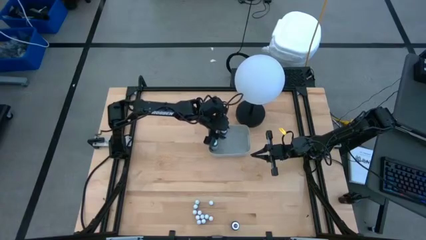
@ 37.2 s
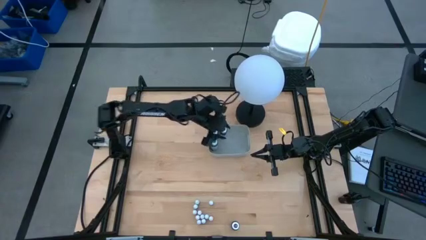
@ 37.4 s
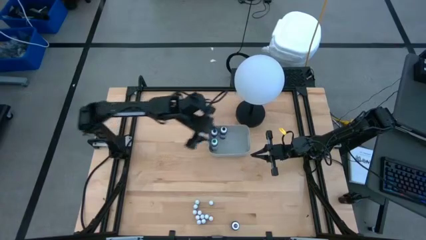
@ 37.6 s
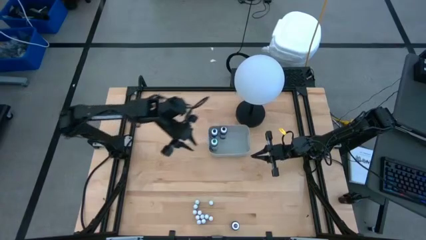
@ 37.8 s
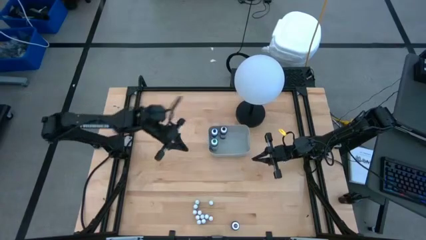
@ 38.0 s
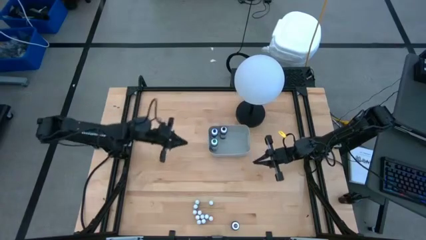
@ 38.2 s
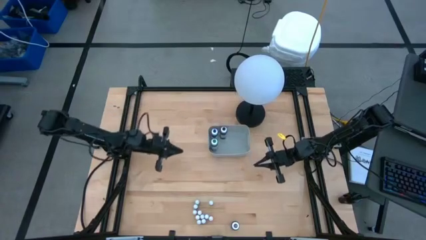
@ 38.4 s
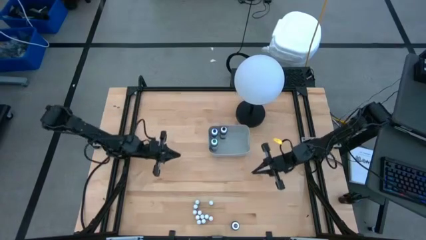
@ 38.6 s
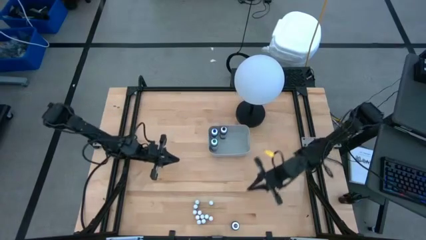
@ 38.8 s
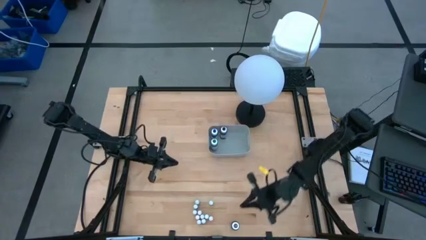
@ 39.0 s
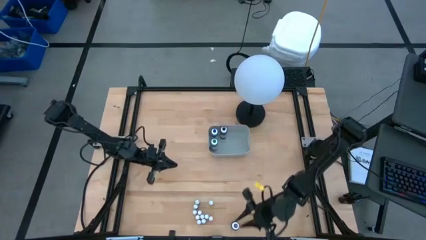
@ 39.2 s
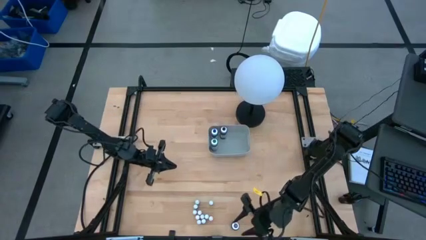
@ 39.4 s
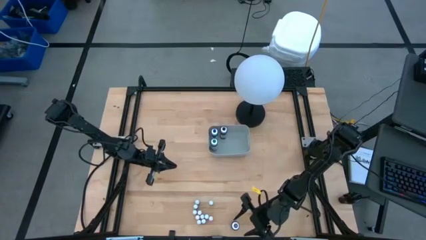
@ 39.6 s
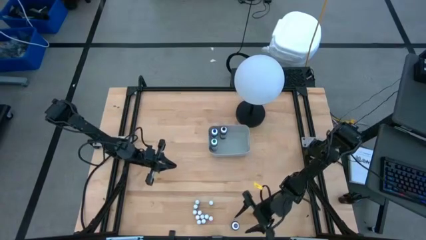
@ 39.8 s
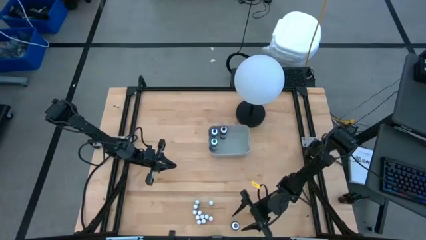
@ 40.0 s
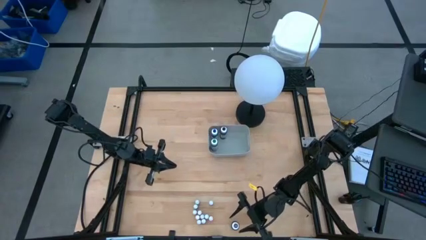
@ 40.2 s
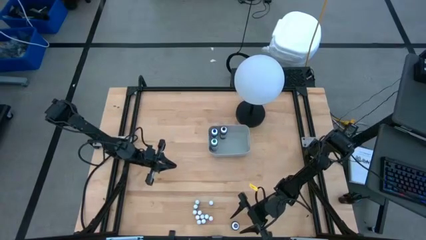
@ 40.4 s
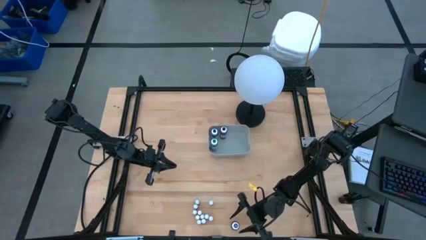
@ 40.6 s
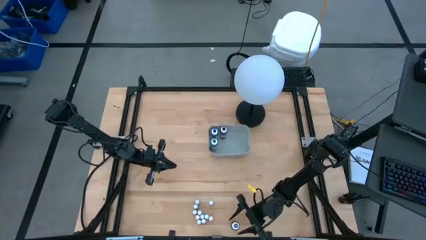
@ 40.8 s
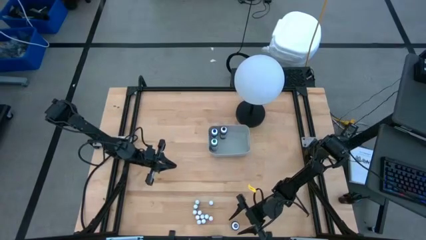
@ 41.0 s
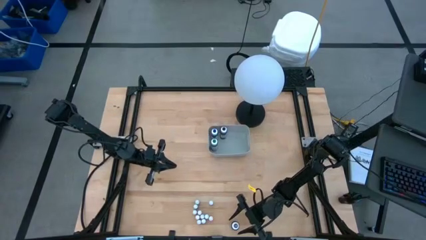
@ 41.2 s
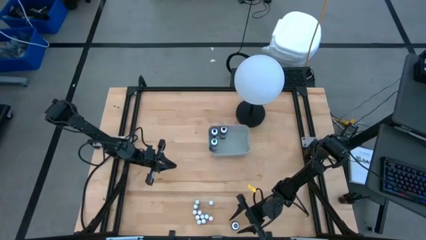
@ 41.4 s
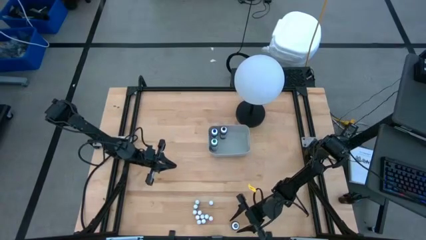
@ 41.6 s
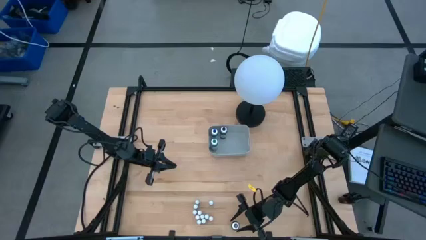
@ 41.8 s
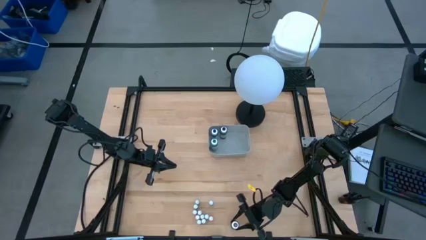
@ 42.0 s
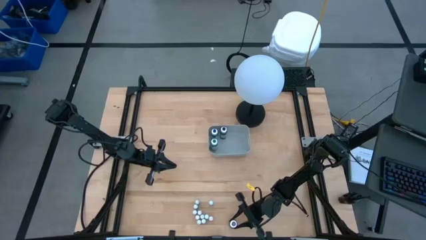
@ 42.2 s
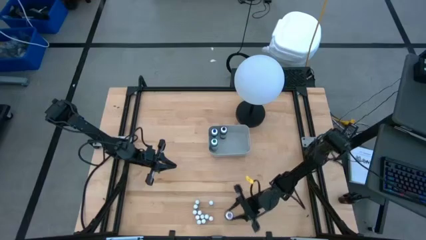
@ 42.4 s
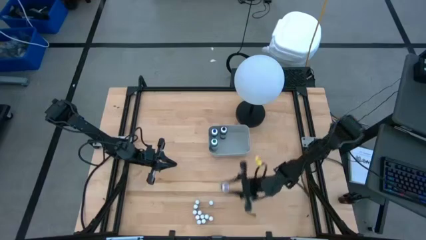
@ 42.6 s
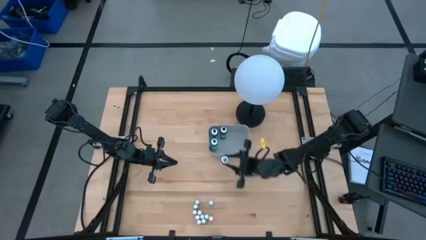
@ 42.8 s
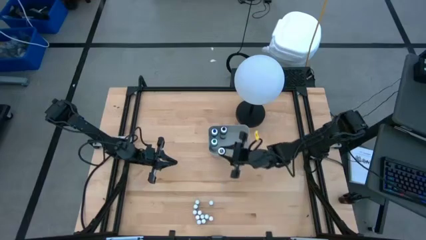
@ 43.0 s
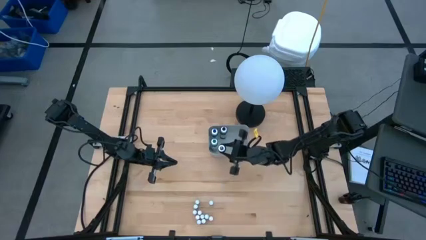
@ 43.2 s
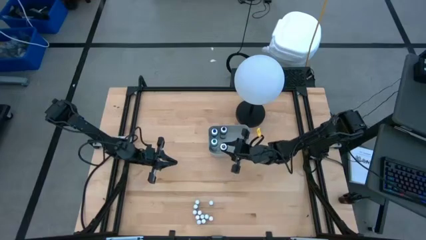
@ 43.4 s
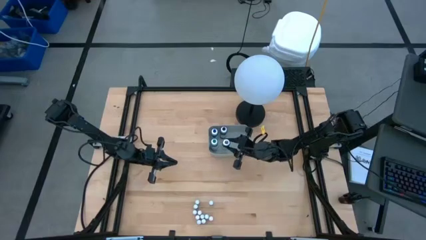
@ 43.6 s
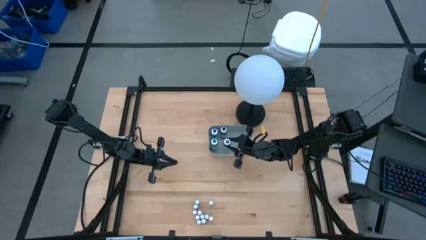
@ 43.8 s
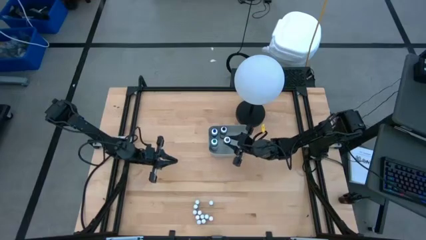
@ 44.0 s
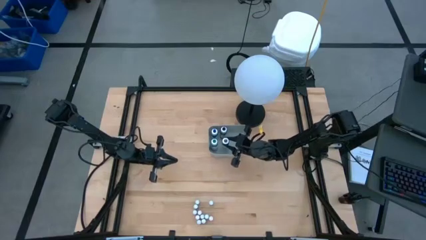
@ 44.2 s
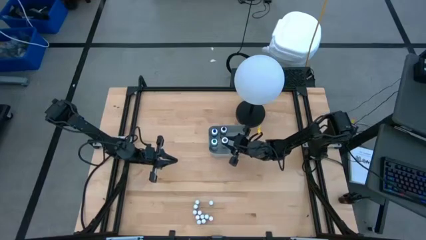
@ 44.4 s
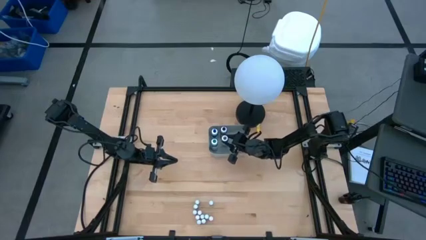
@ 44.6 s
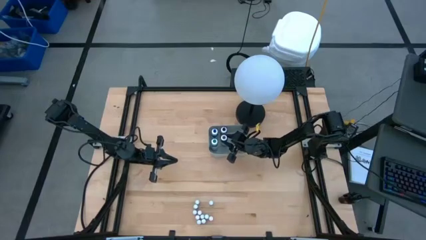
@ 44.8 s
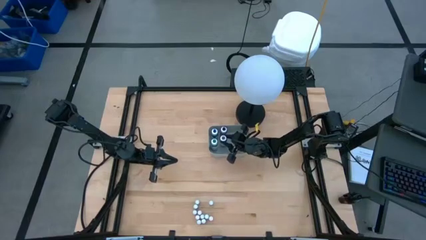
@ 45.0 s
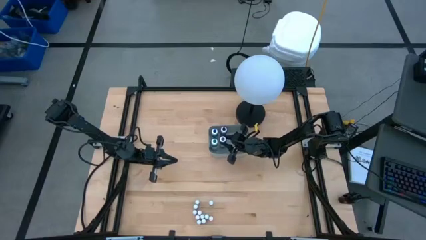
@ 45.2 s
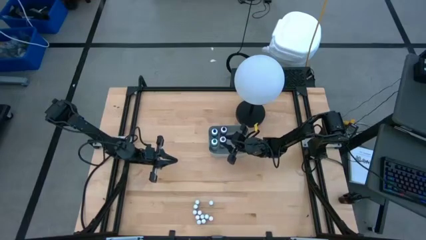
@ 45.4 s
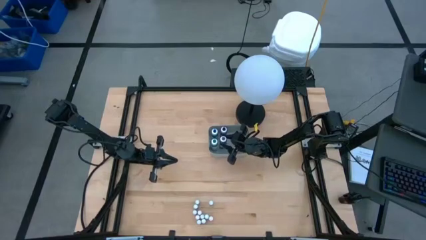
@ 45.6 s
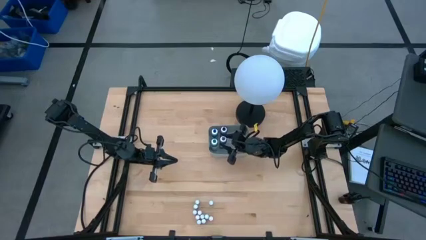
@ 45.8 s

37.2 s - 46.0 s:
Task: Pick & Place food coloring
Put the violet food coloring bottle into the gray bin

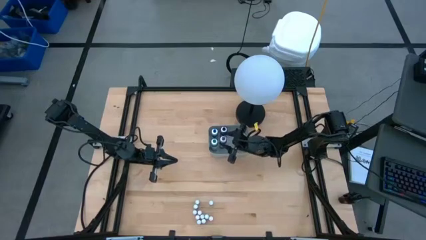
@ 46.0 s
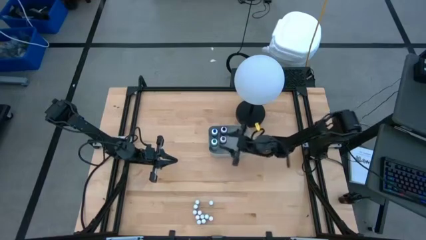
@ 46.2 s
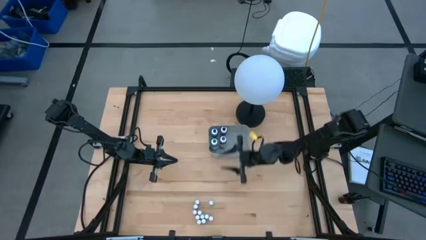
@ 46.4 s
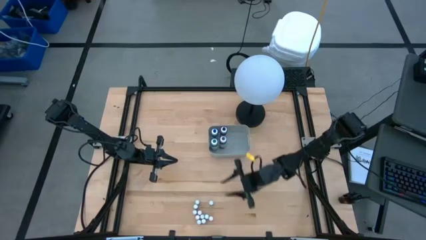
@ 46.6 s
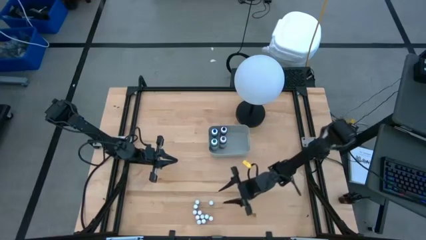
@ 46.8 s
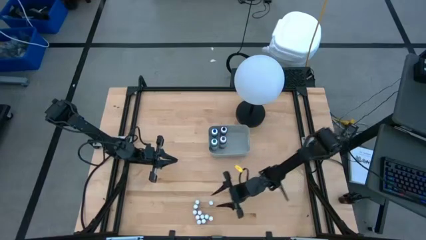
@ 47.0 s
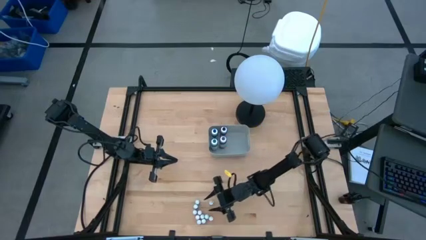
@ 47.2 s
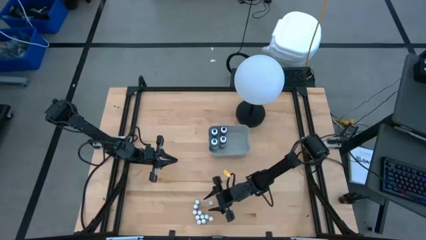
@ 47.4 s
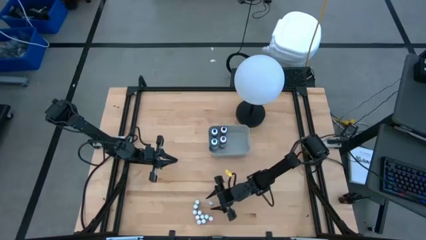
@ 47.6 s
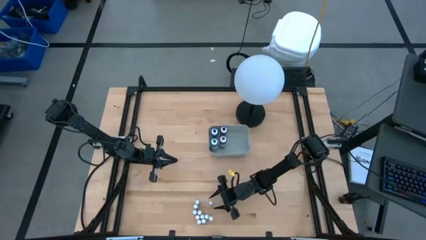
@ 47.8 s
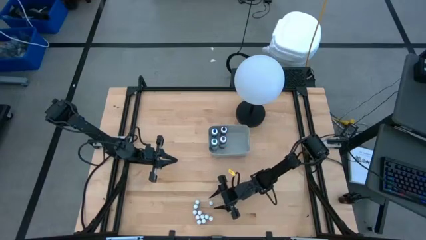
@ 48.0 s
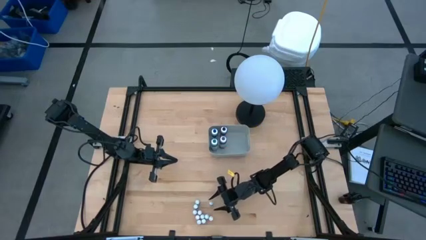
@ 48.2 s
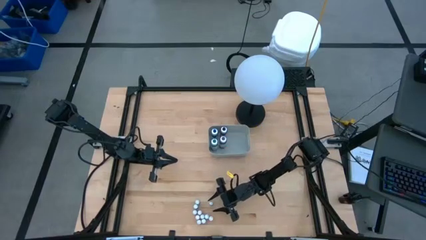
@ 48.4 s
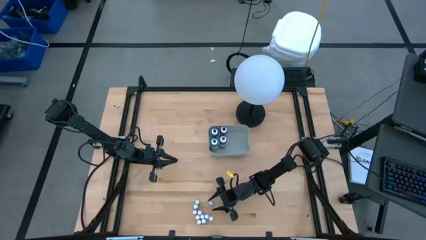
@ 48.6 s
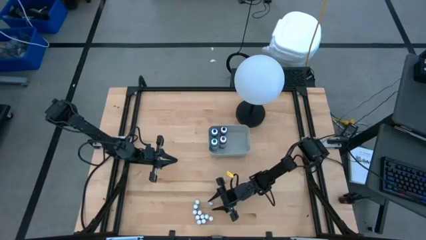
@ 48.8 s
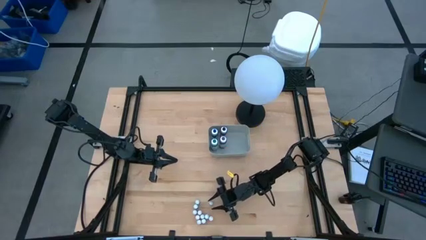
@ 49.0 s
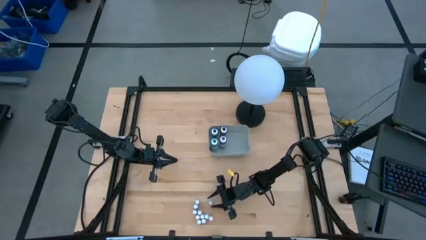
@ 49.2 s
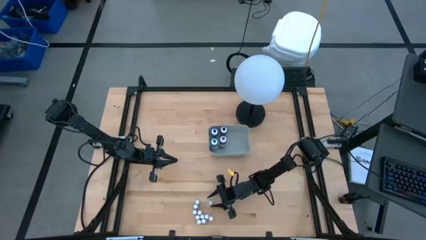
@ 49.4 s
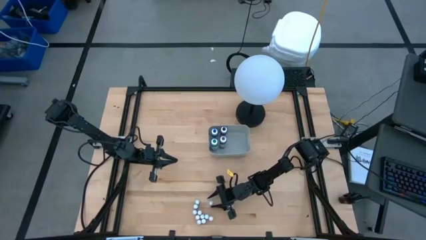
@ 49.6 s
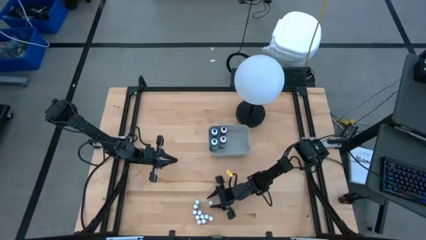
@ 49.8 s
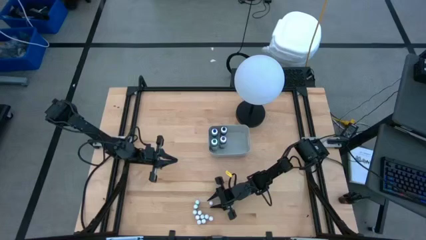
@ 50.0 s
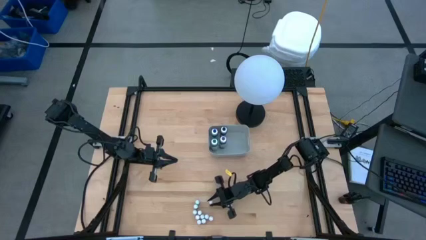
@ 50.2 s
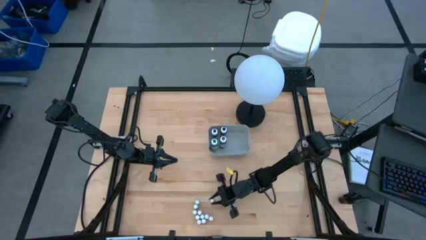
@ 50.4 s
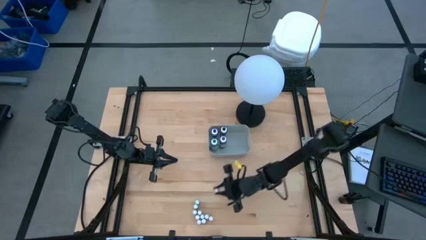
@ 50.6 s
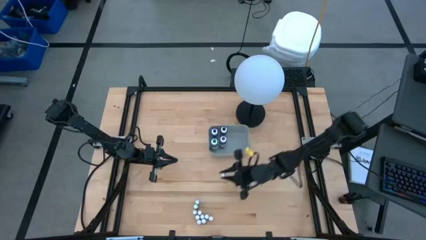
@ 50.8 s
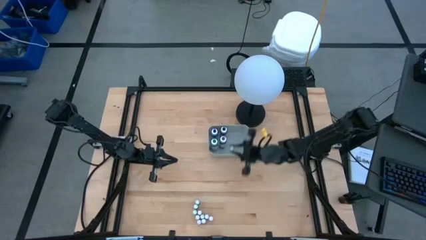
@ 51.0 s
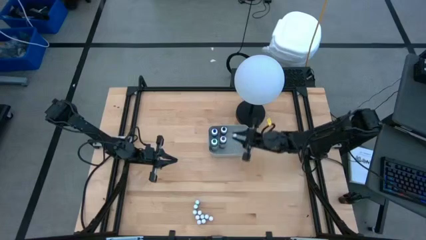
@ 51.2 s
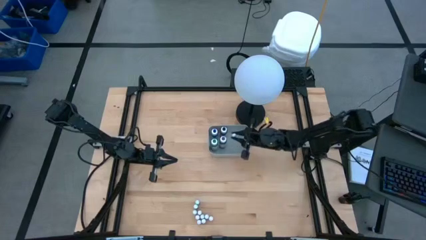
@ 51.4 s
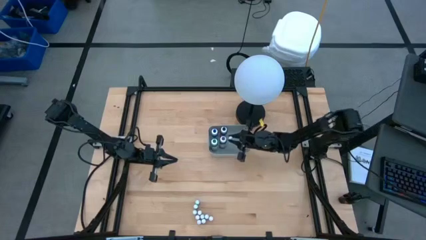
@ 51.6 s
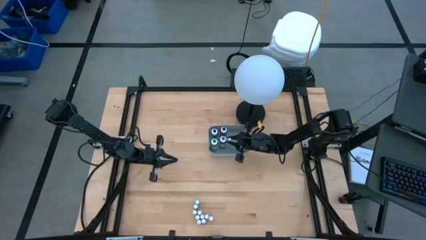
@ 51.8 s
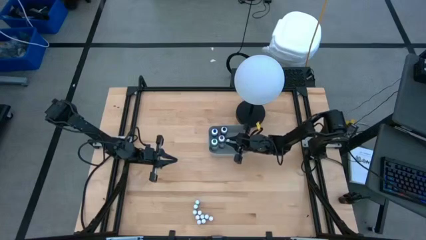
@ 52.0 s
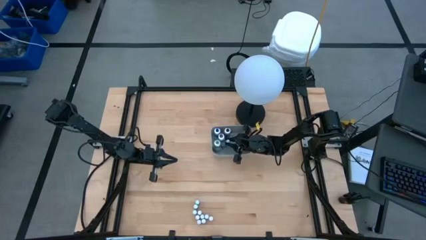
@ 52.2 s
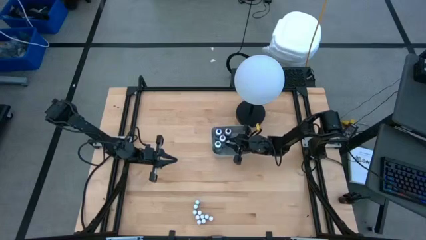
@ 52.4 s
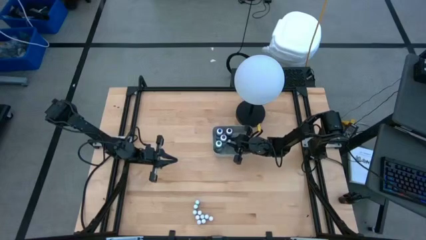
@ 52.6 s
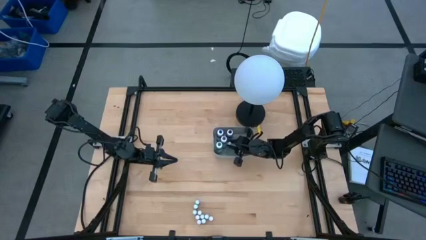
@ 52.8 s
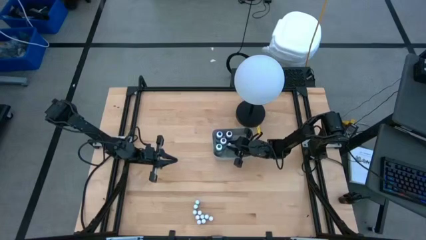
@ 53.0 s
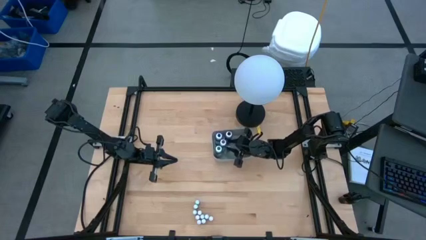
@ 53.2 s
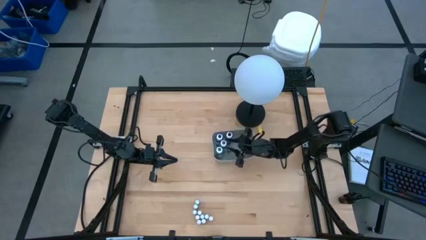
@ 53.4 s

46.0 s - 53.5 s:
Put the blue food coloring bottle into the gray bin
